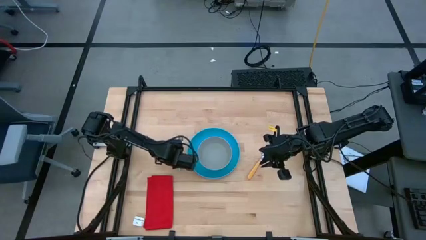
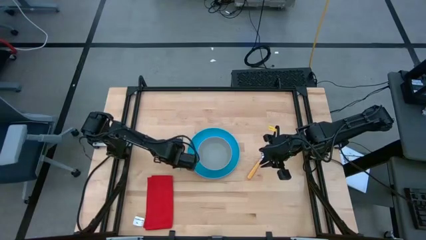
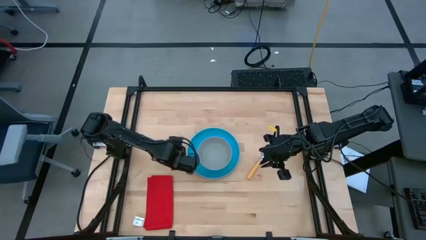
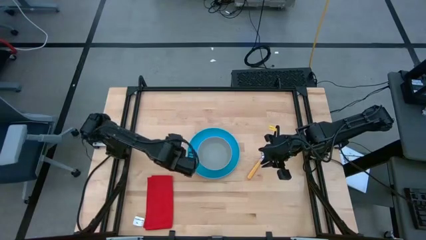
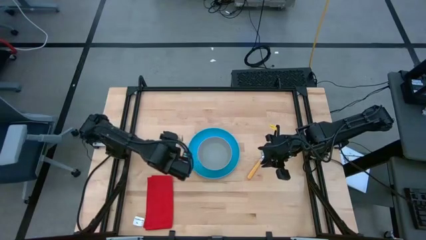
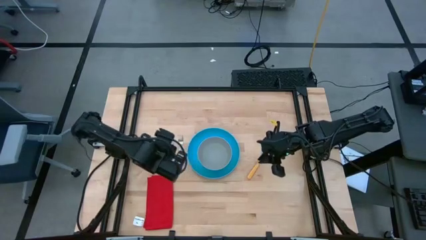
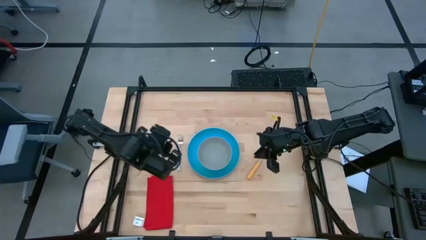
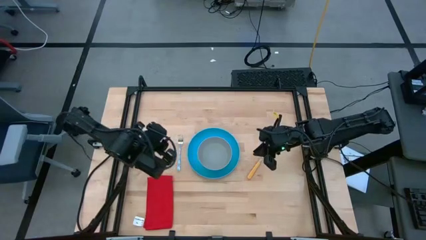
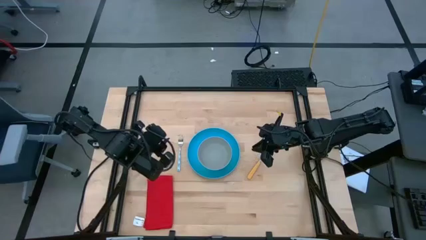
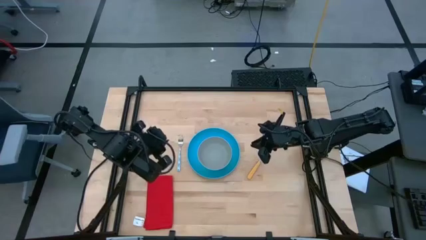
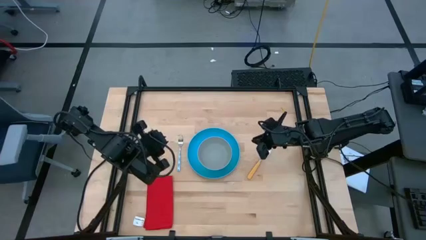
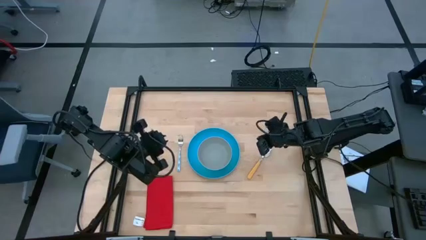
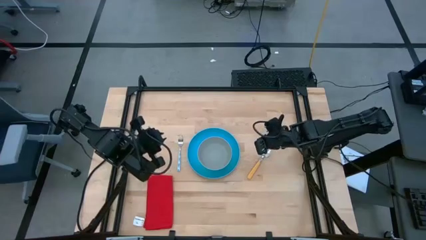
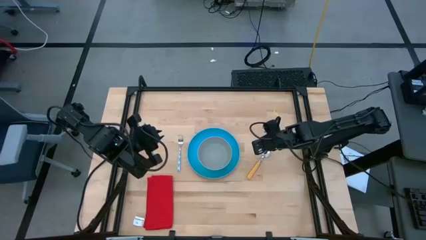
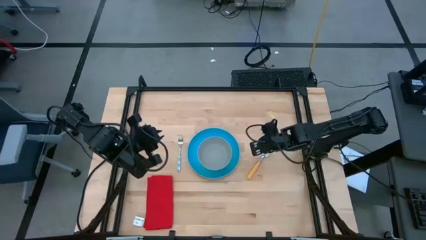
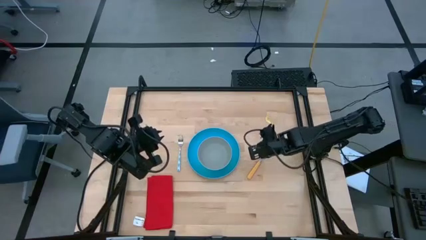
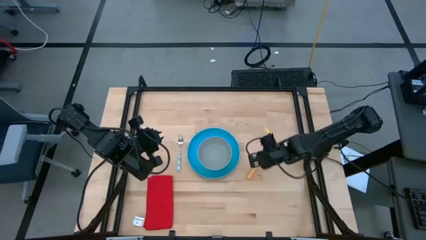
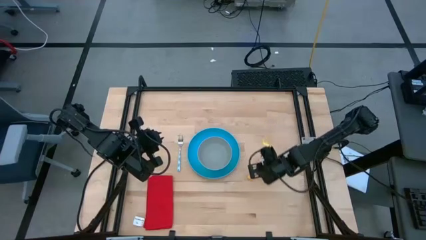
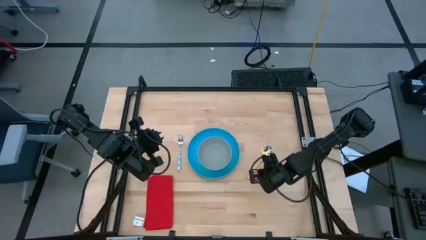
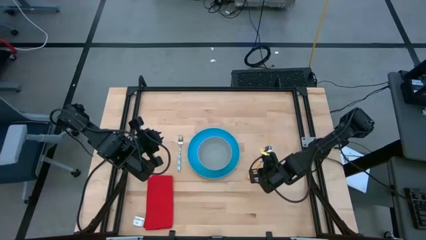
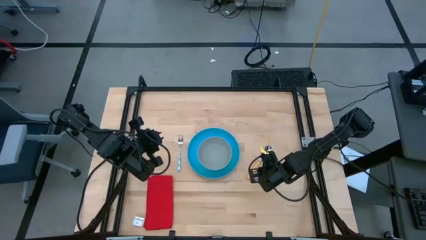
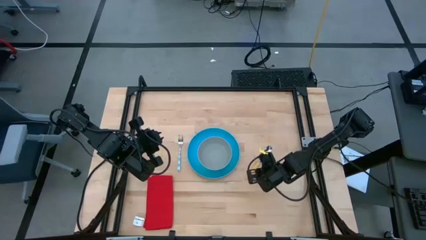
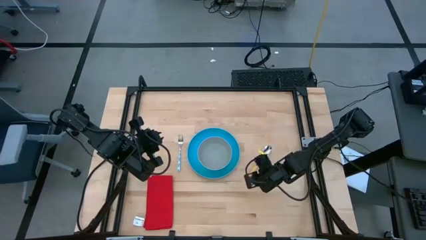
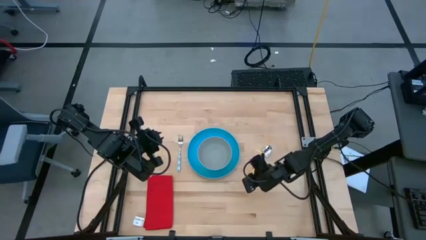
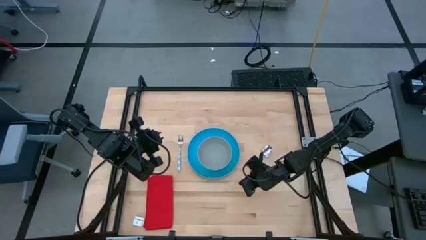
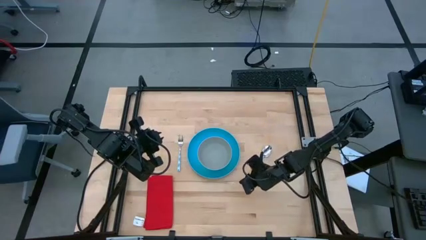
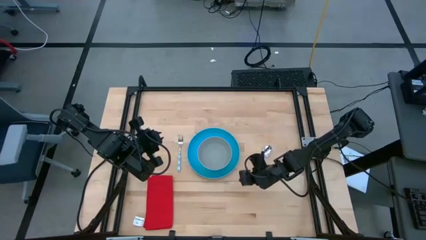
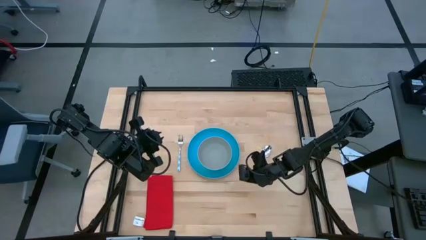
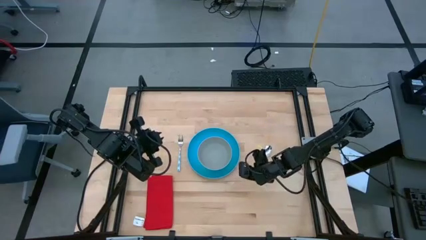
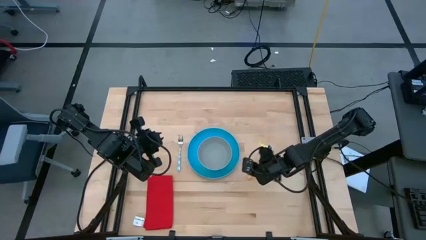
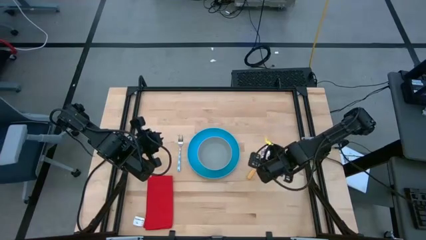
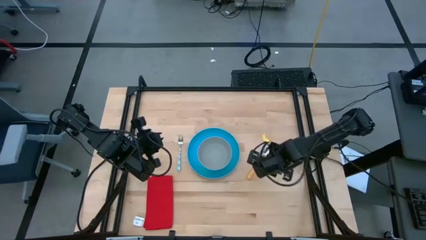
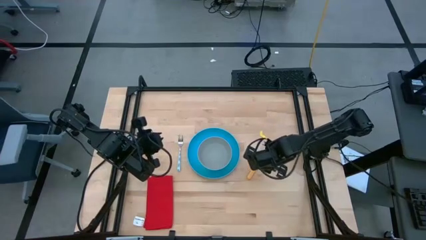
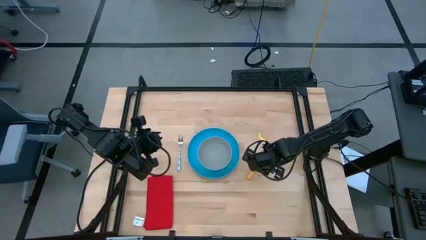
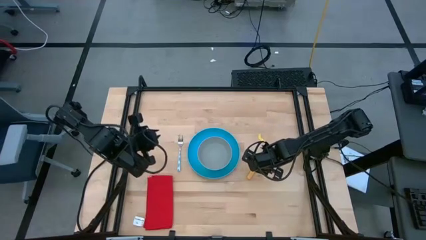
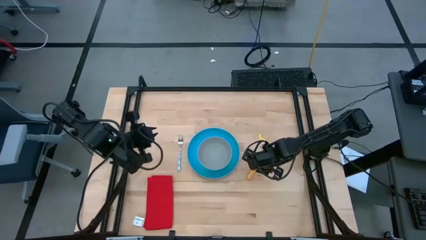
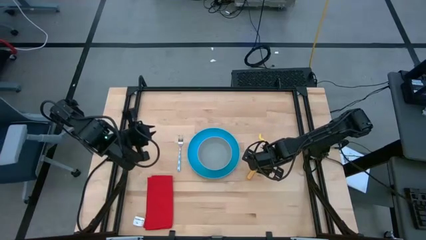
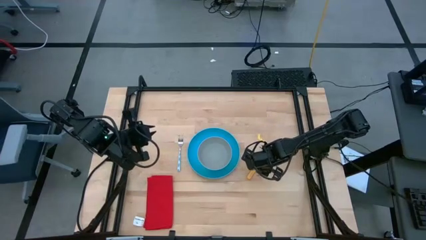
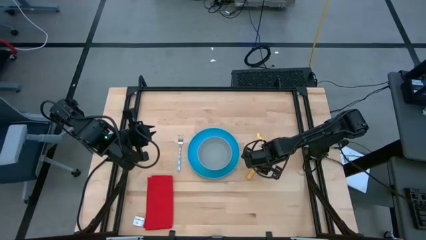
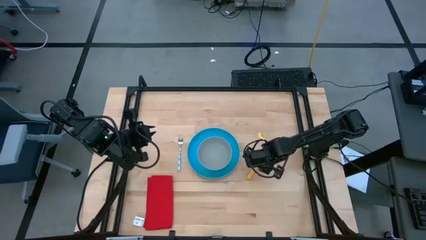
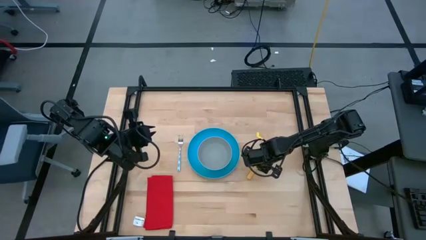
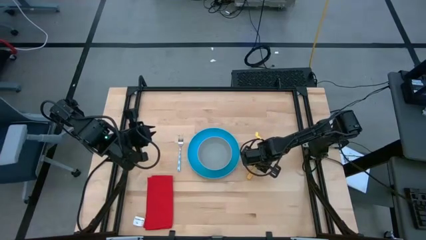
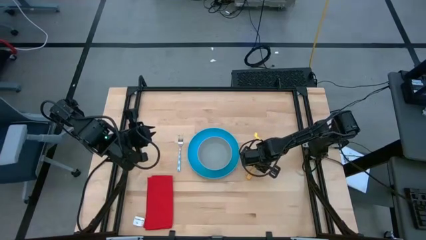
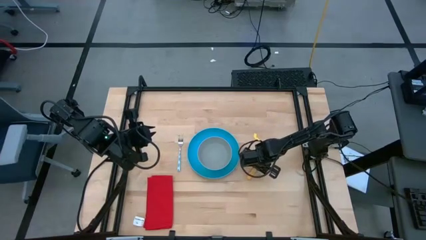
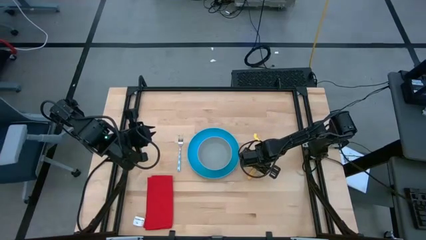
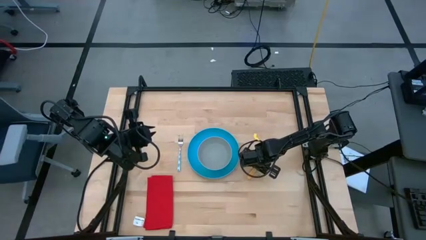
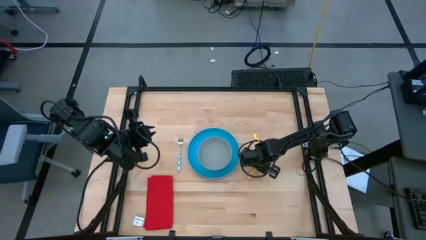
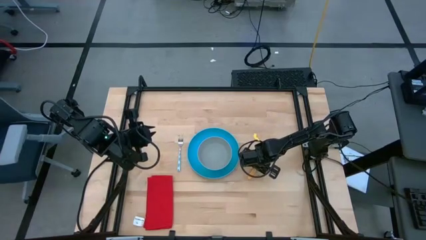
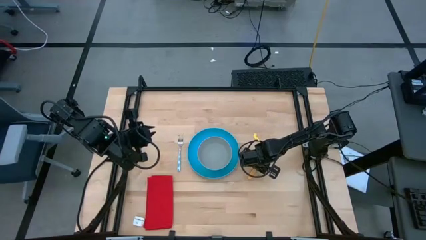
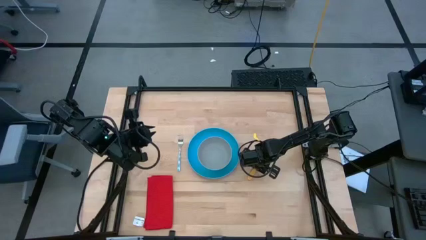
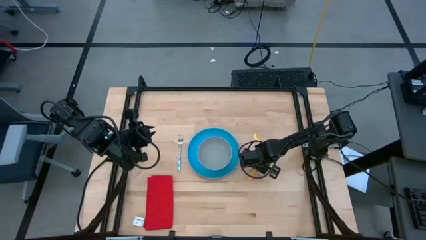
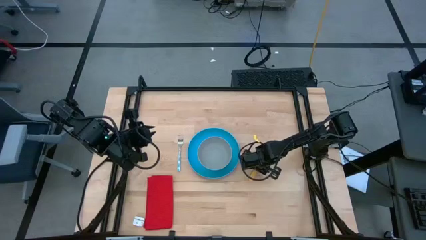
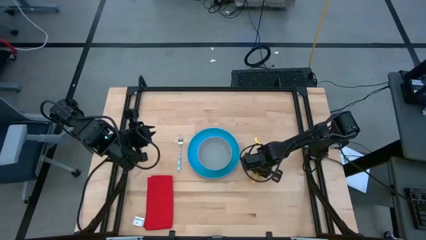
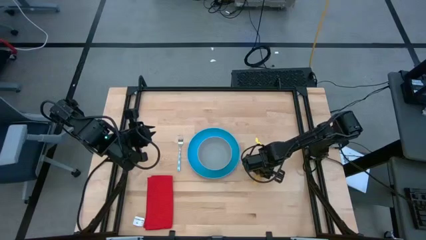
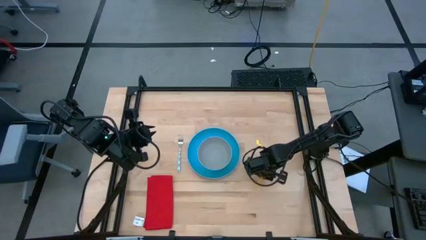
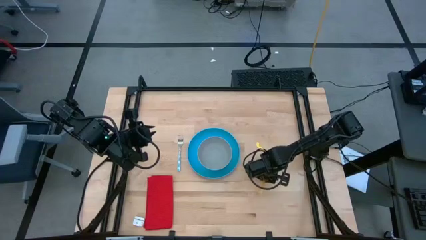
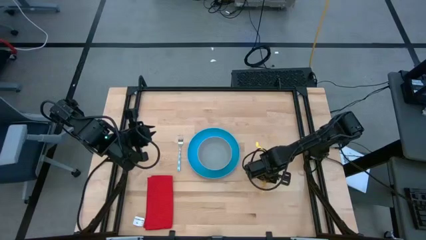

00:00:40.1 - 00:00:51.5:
Task: Set table place
Put the orange spoon into the gray bowl
